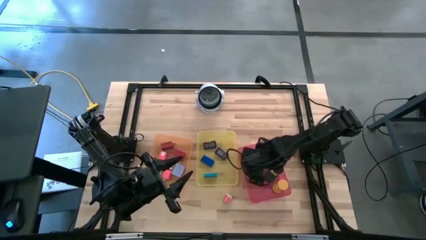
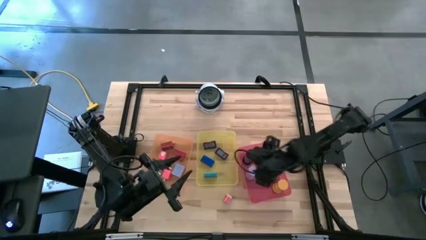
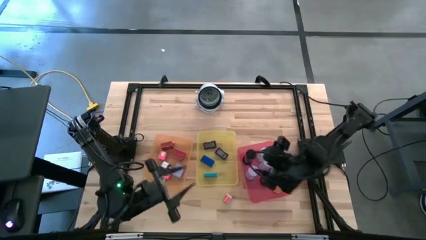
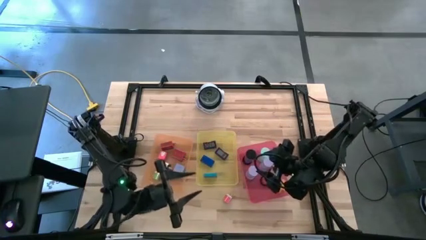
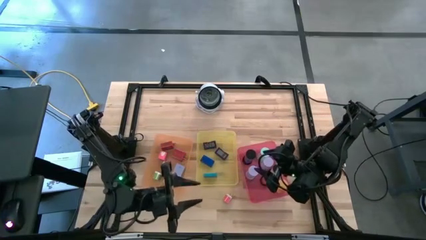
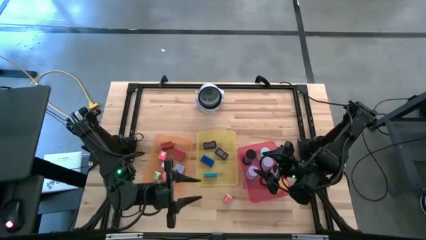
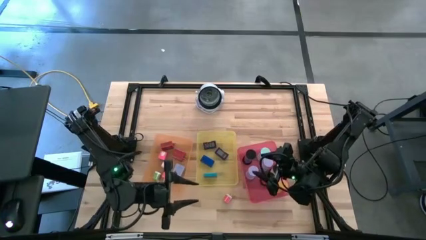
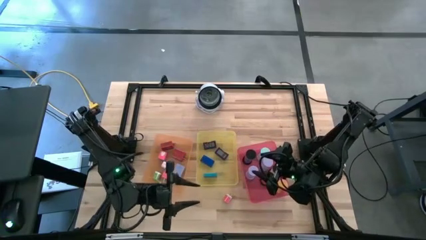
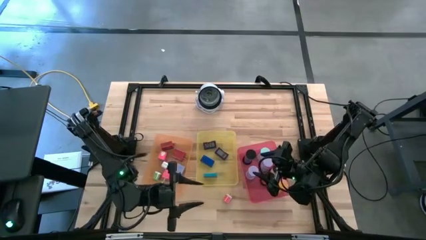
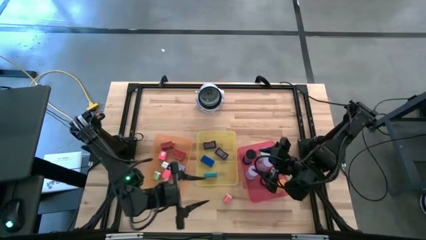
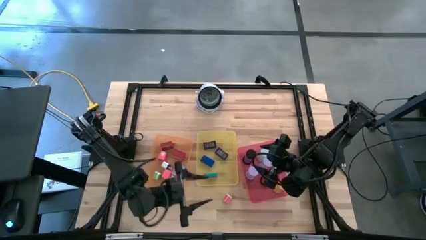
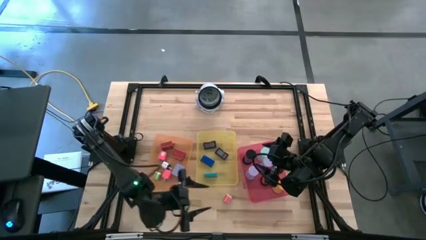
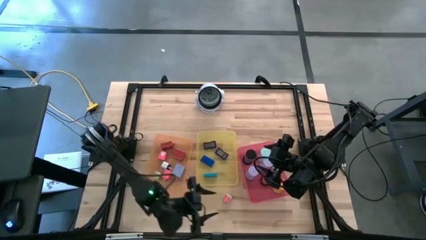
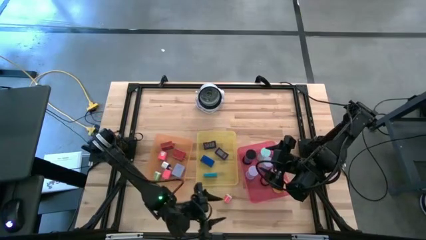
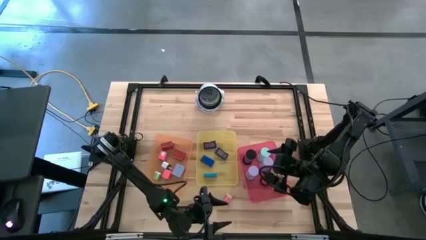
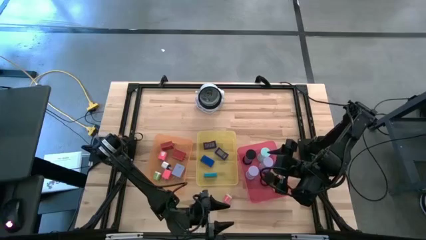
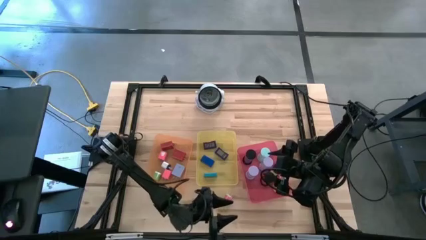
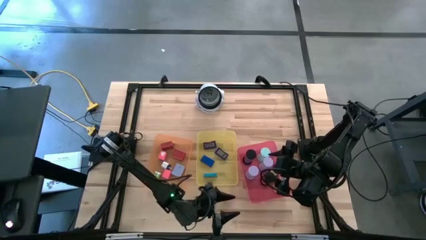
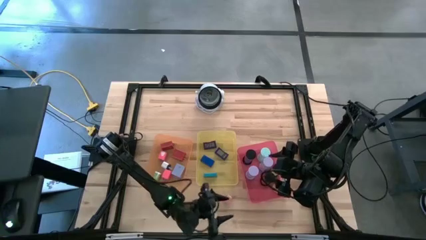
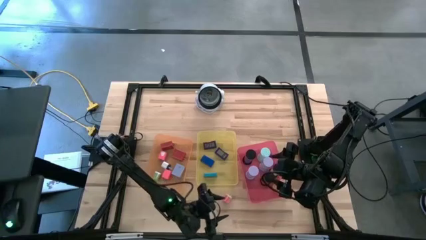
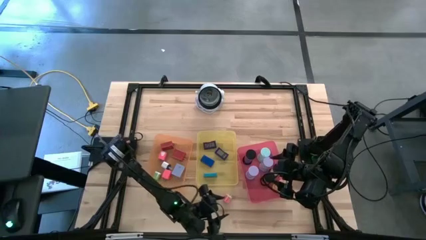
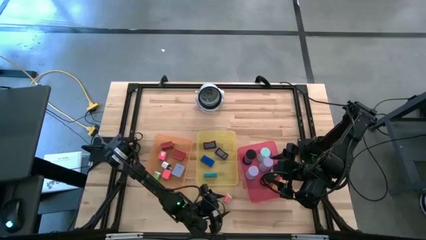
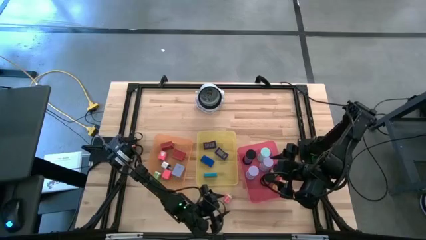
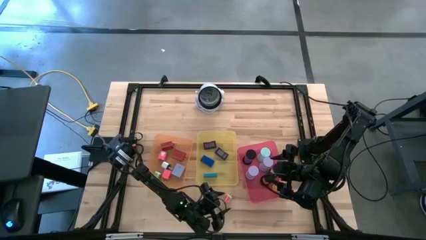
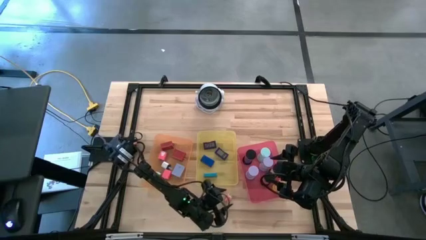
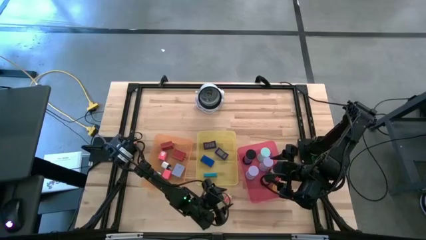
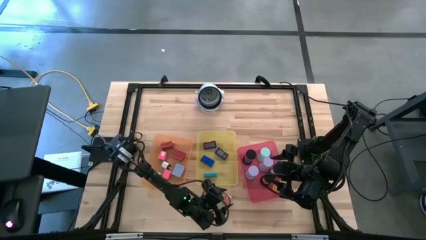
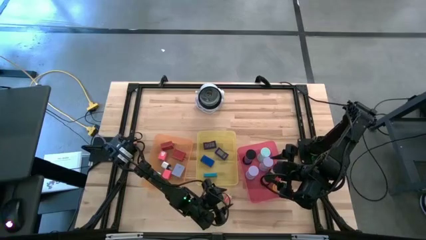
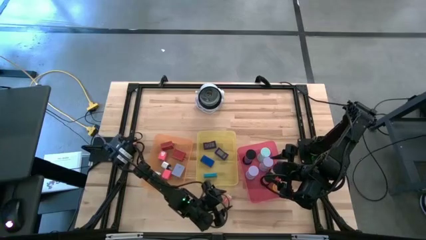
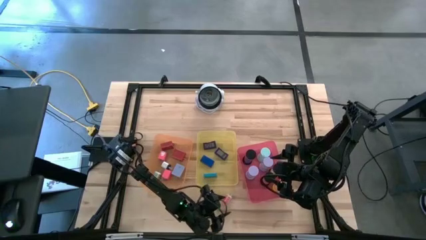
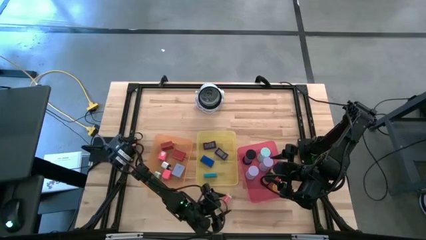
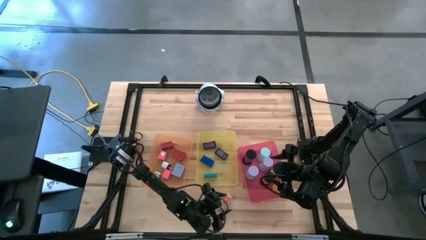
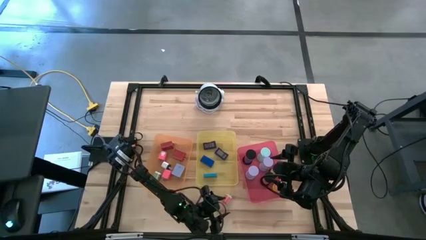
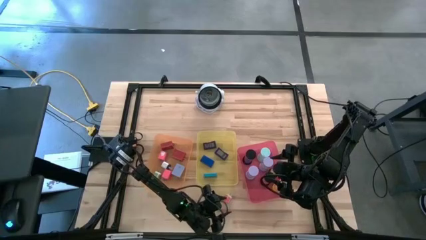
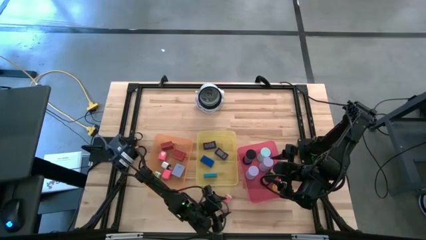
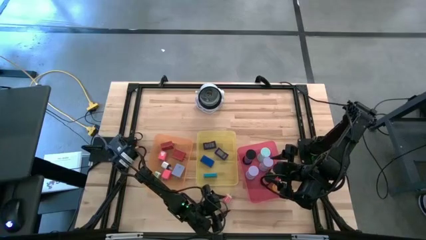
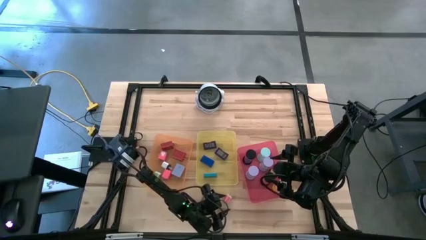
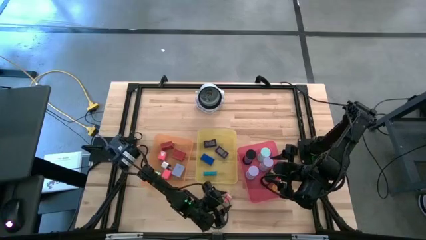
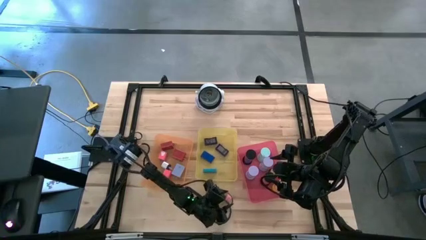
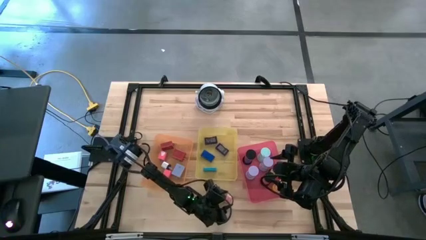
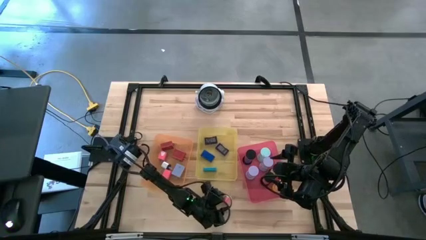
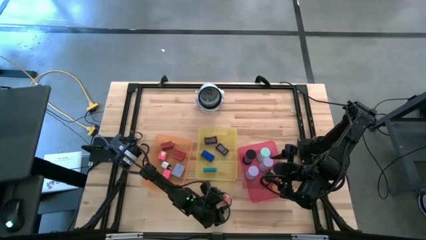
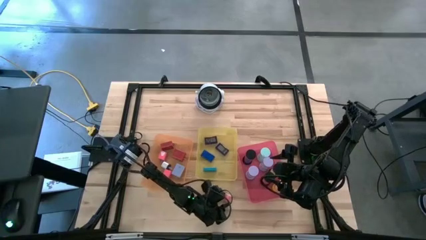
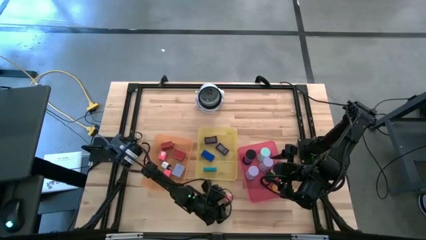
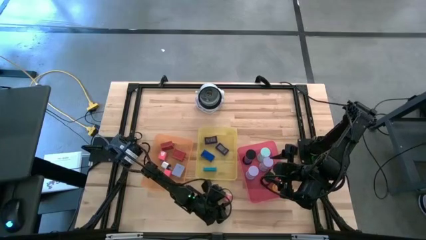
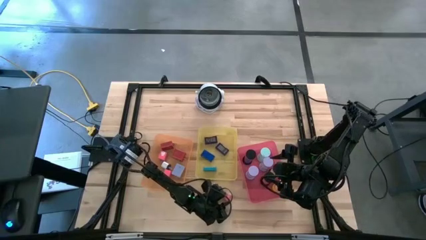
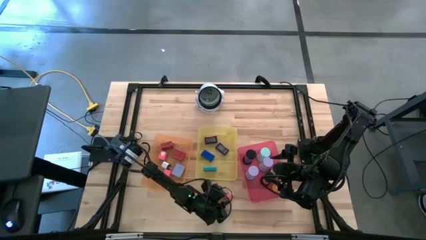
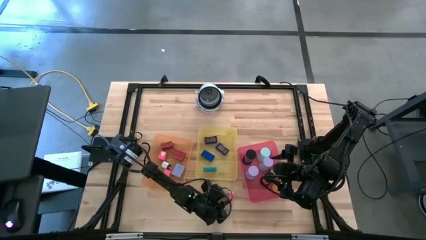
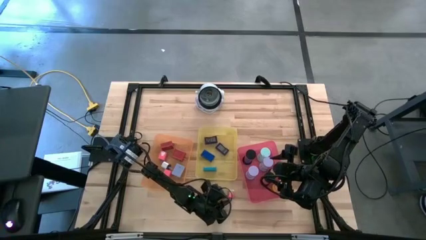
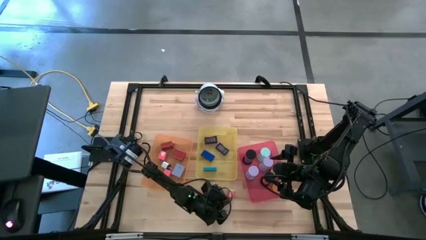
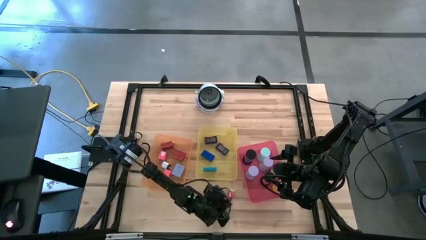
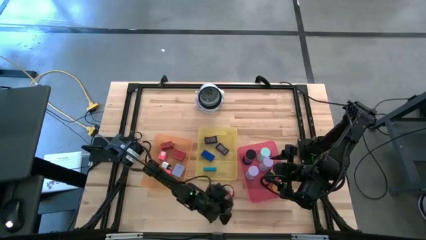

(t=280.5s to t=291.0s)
Task: Pick & Place Office items
Put the pink charger adaptor into the orange bin
